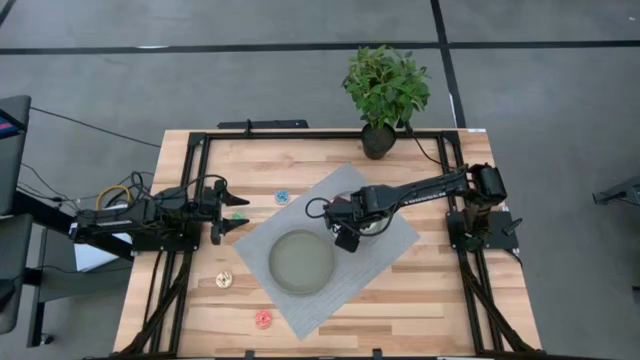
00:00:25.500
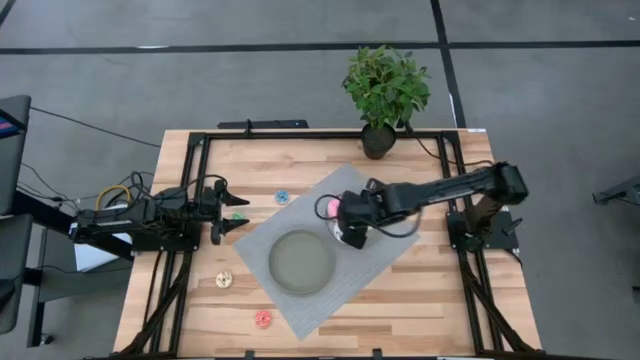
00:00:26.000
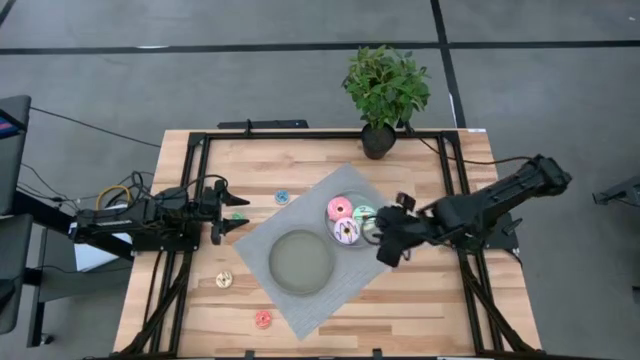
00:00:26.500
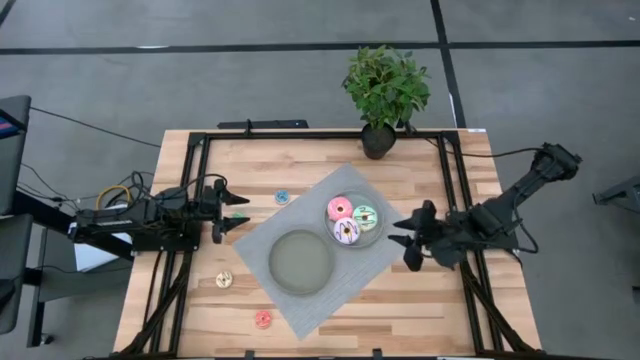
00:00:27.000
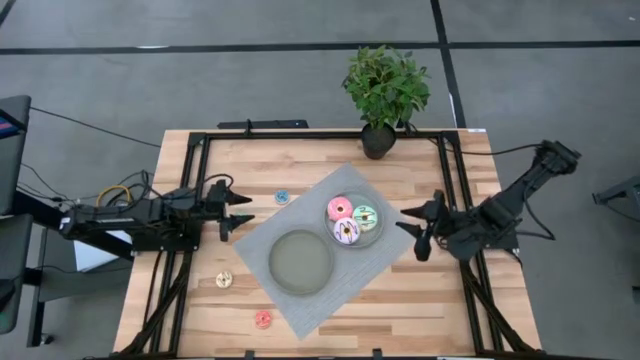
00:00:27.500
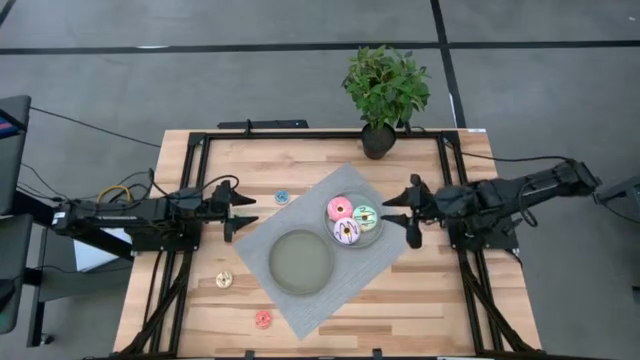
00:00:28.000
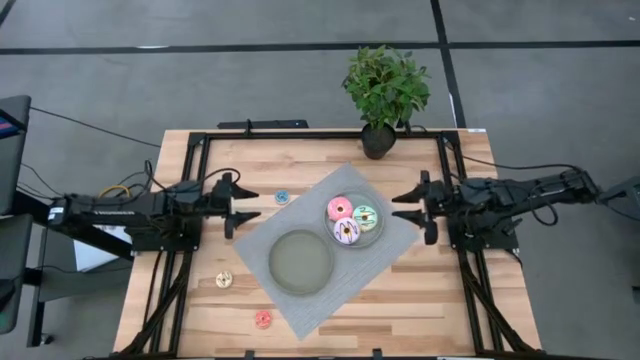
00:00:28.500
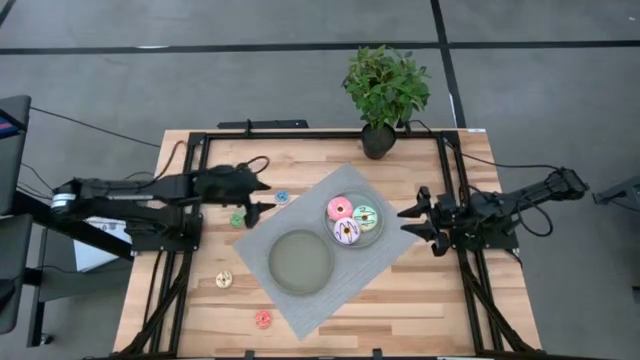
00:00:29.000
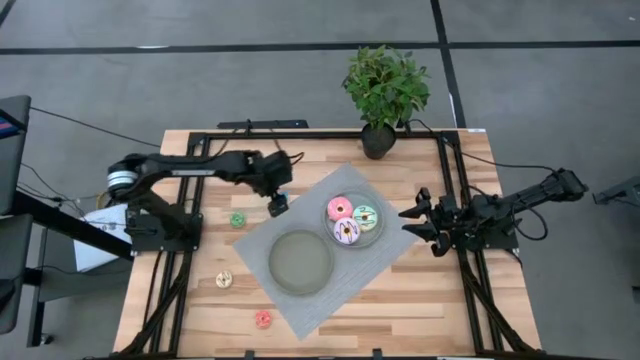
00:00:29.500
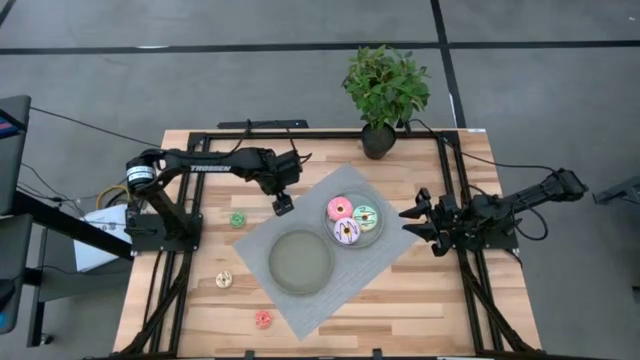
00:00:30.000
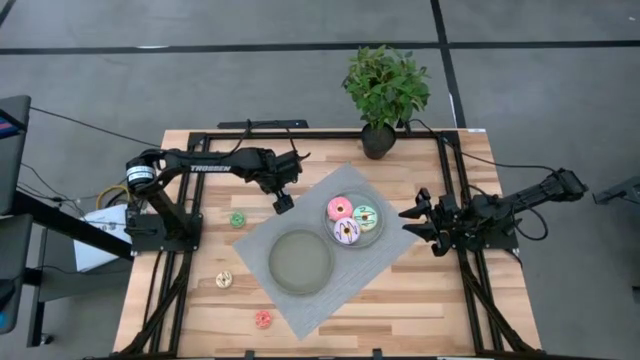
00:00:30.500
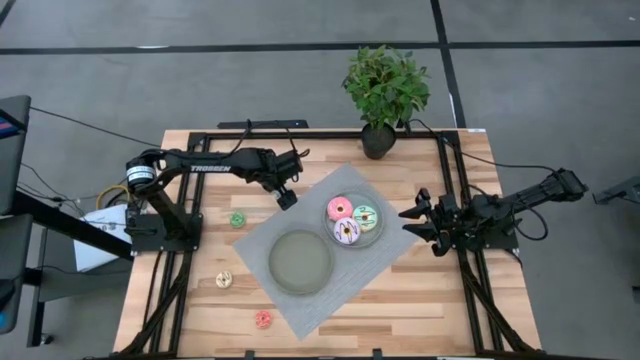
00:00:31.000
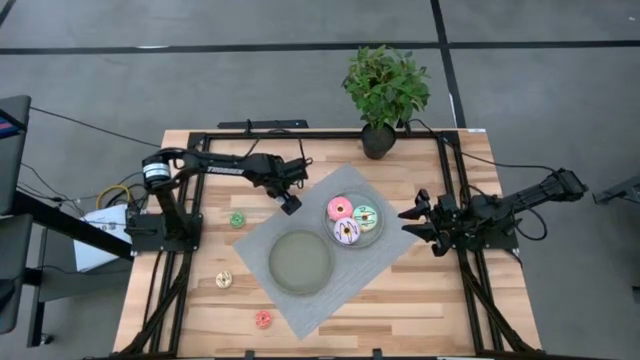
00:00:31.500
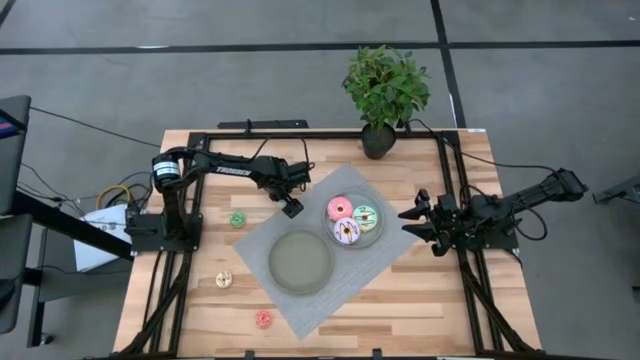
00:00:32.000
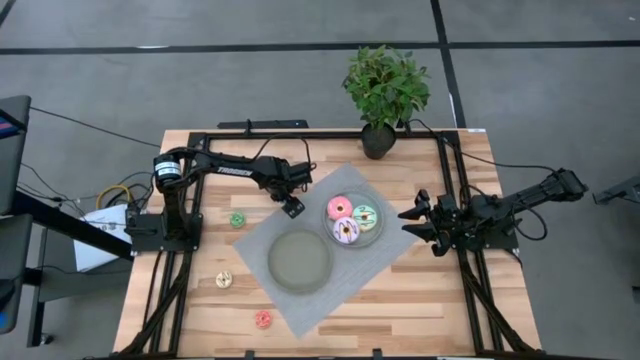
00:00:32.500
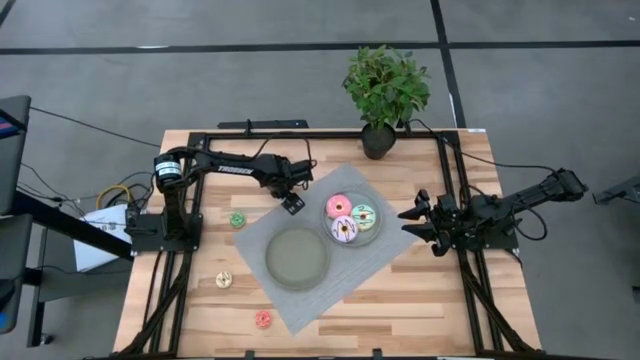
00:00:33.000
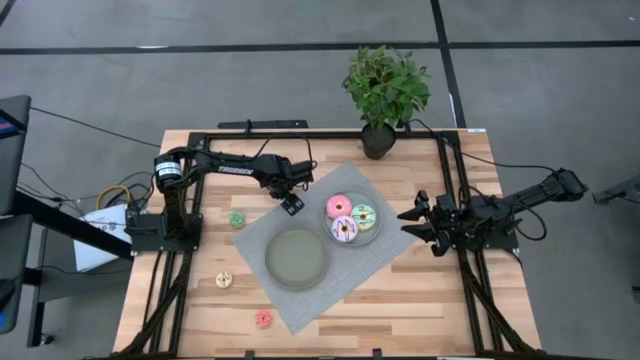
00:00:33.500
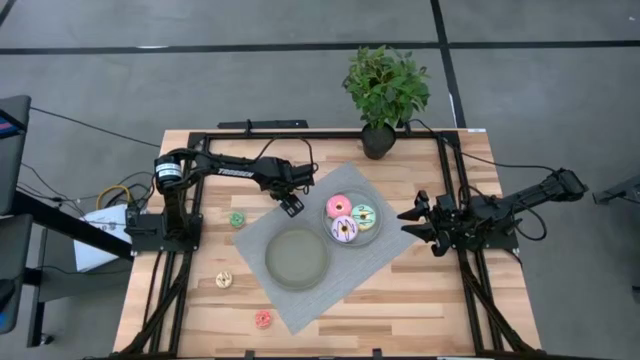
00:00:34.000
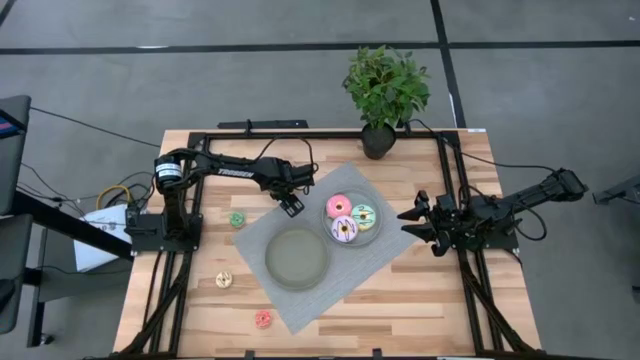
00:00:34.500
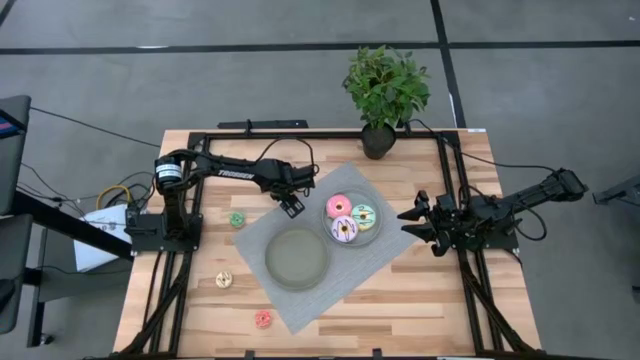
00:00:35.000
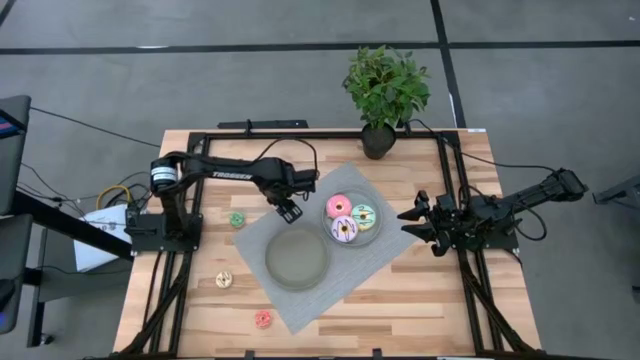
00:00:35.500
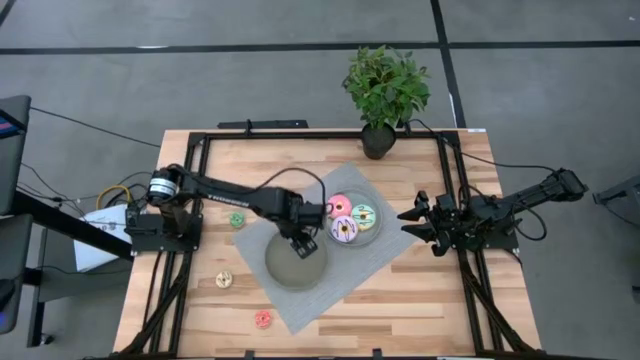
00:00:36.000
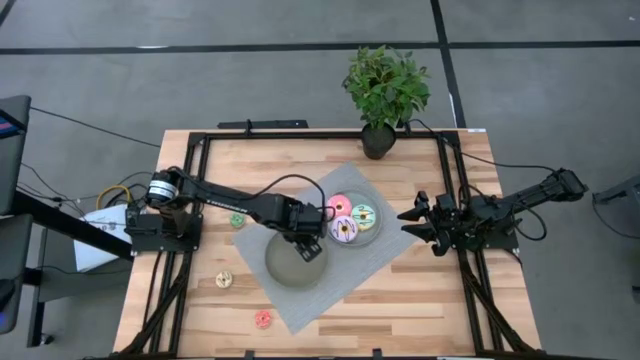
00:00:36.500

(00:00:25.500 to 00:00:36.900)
Task: Pick & Place donuts
Put the small blue donut on the dark gray plate

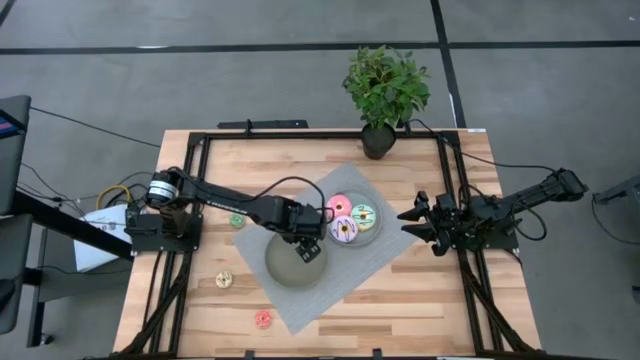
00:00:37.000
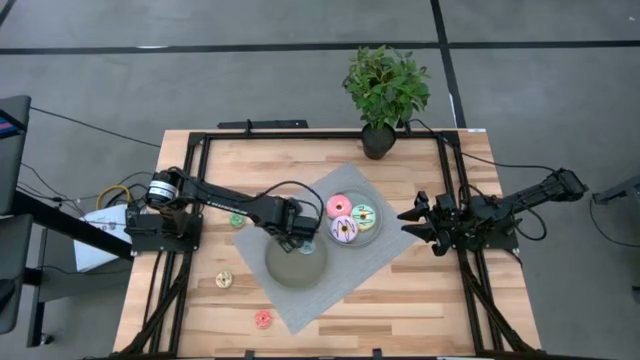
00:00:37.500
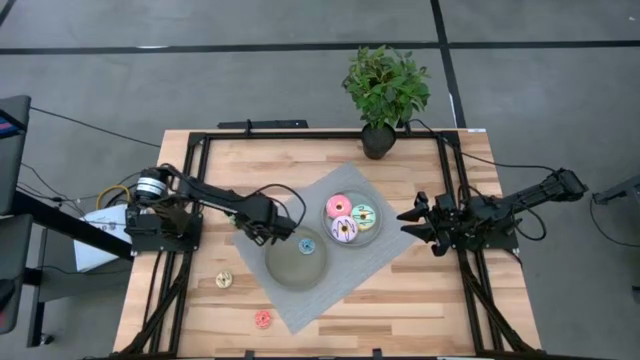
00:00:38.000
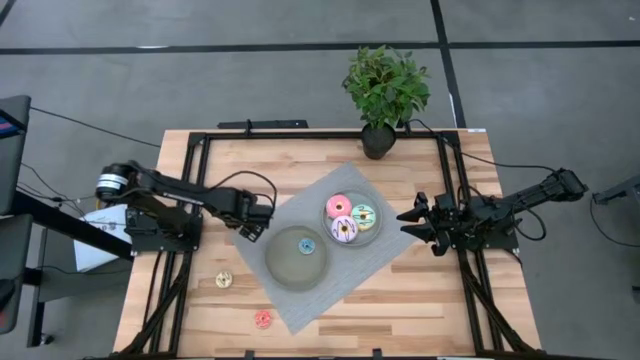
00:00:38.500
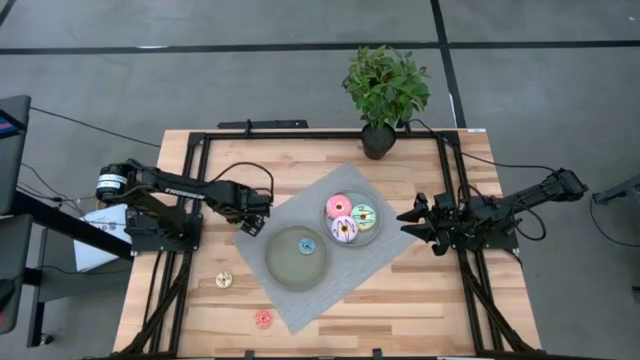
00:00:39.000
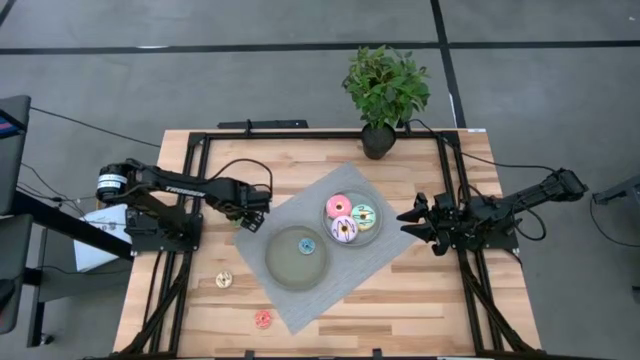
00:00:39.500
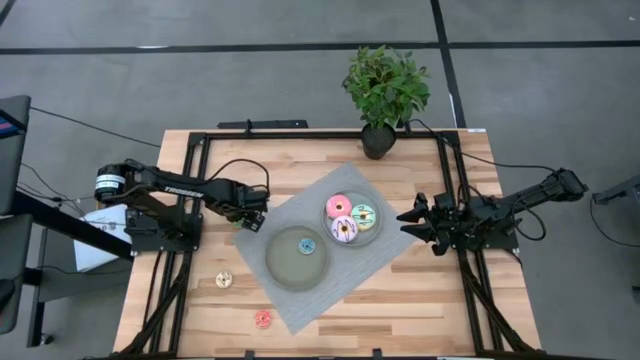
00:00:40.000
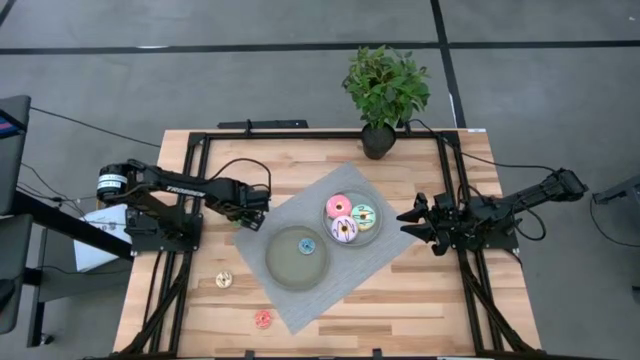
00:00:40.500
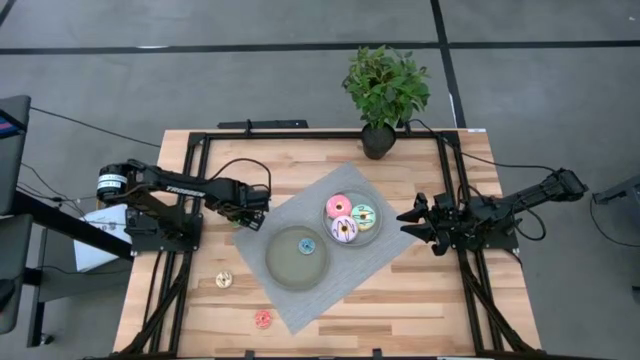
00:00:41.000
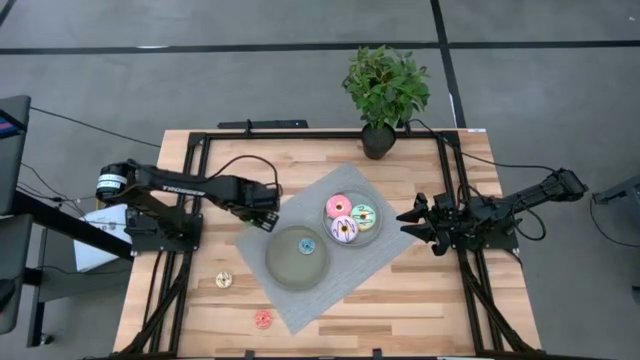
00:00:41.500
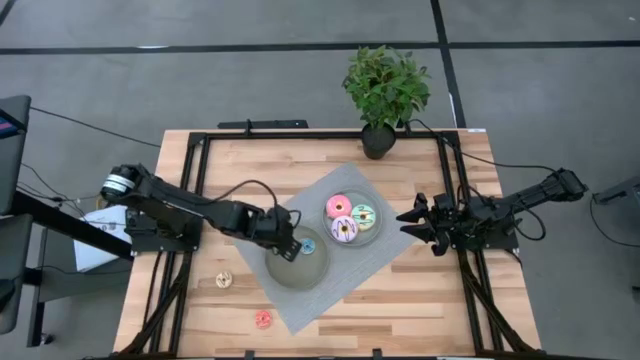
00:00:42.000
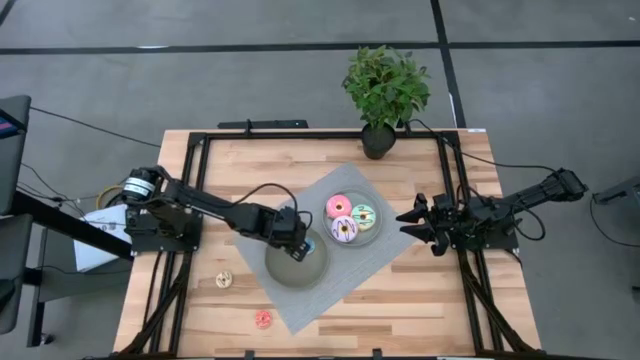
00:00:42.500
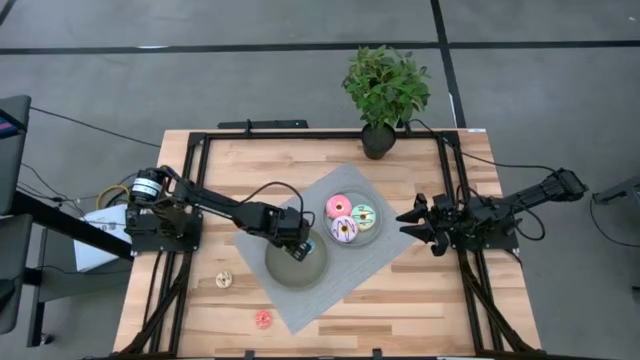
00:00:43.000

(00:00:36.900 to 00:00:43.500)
Put the small green donut on the dark gray plate

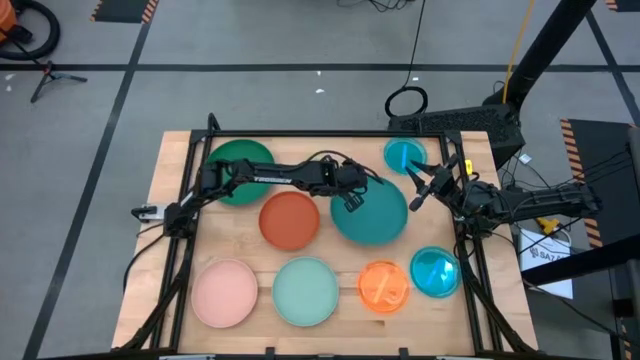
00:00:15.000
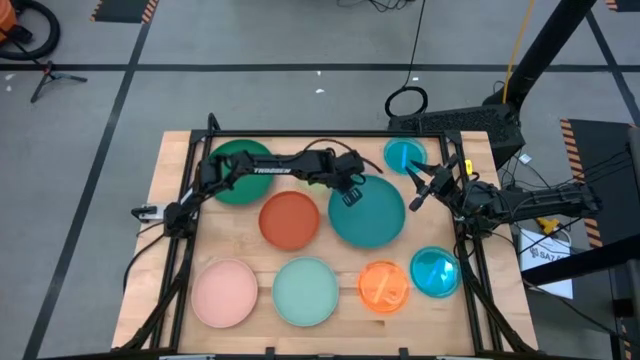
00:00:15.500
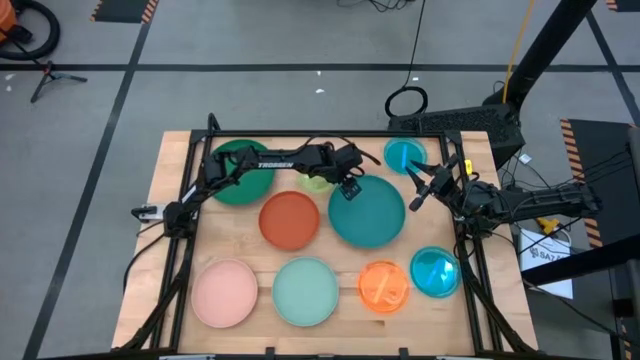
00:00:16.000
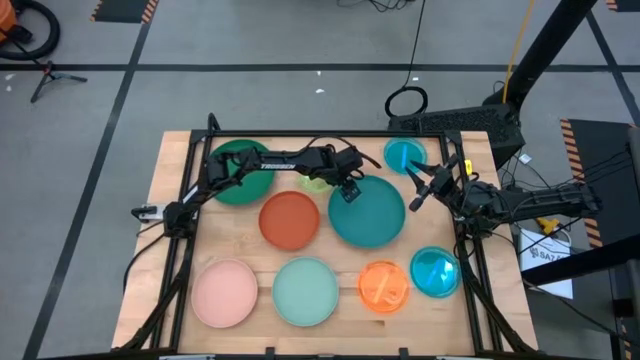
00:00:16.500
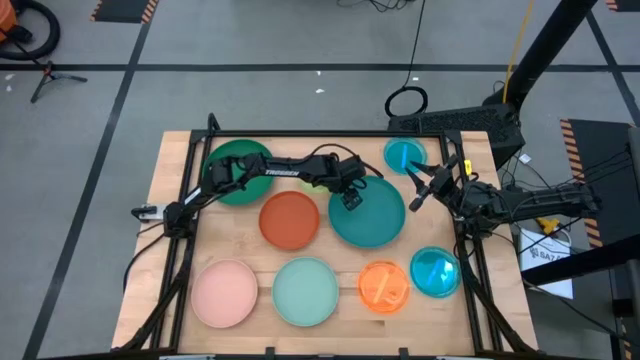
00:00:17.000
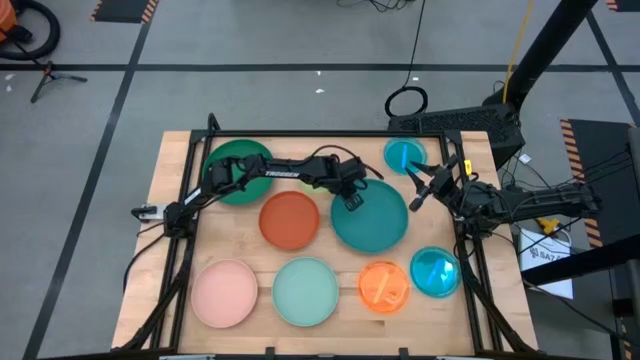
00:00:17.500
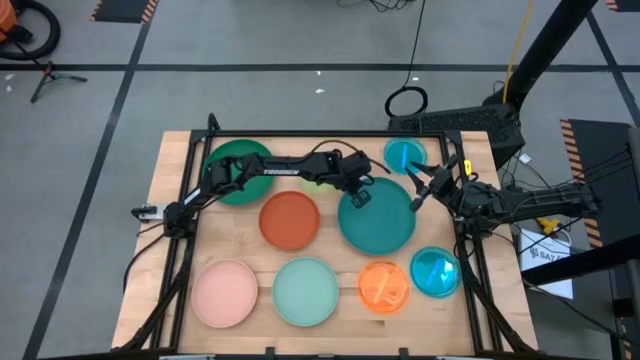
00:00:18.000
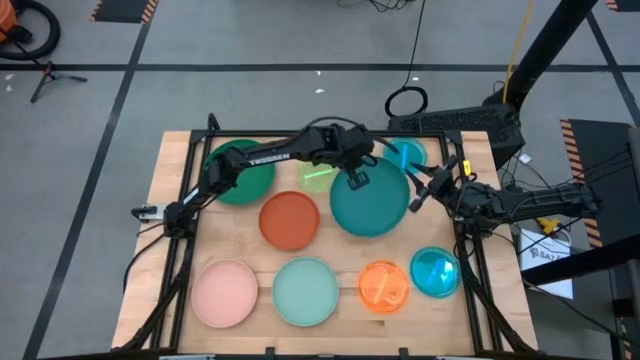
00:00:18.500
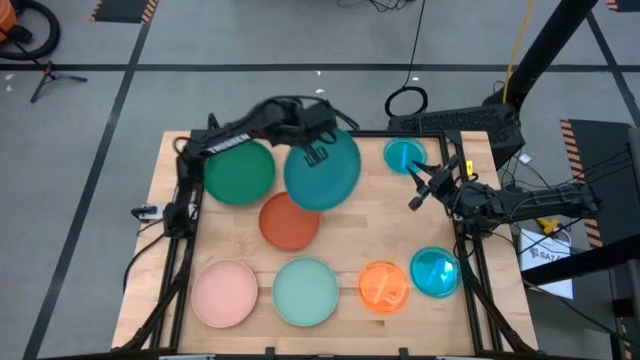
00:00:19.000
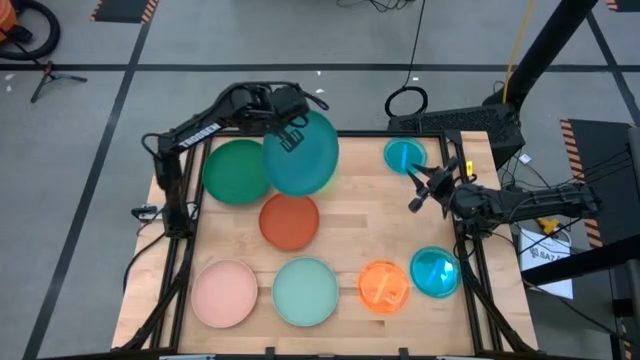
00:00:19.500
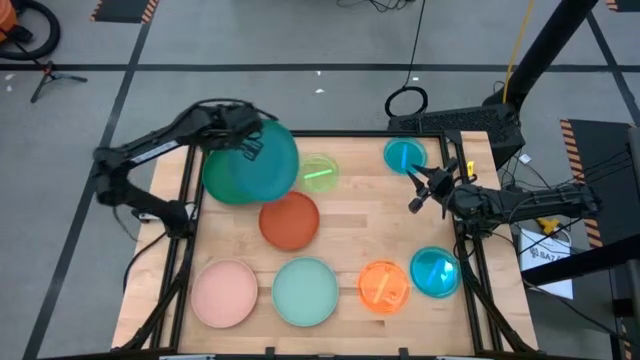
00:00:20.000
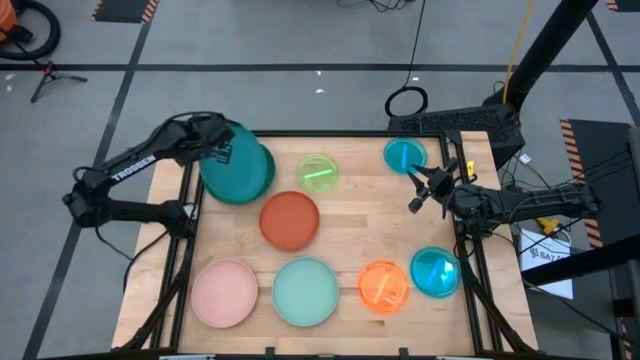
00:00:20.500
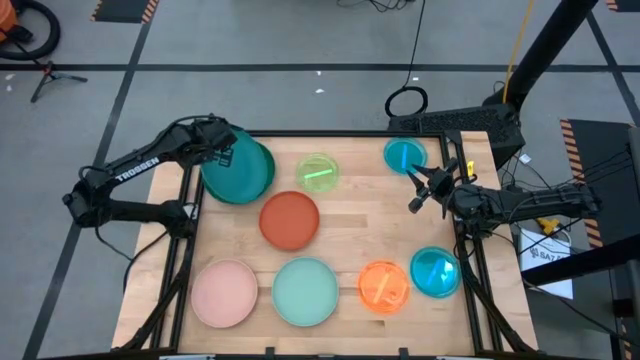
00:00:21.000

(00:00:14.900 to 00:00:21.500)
Task: Stack plastic plates
Stack the dark blue plate on top of the dark green plate
